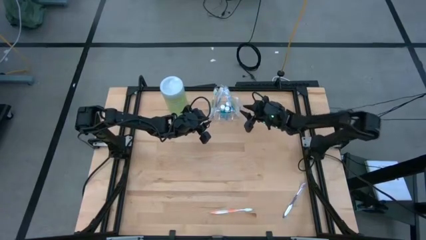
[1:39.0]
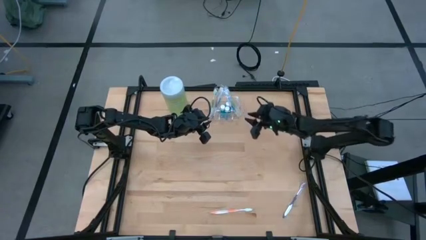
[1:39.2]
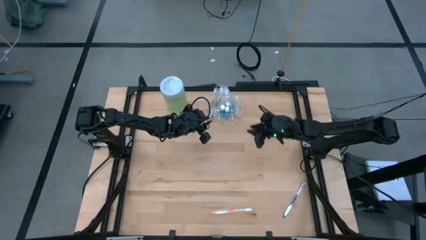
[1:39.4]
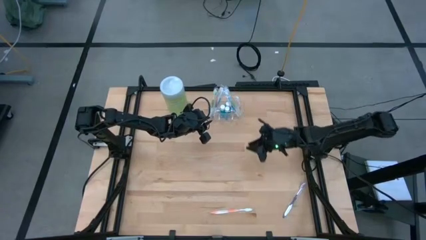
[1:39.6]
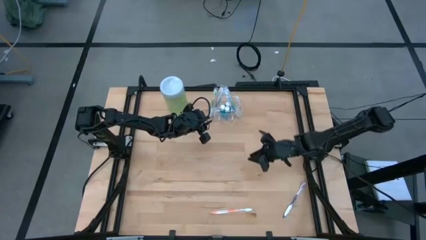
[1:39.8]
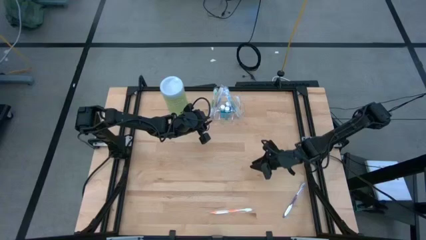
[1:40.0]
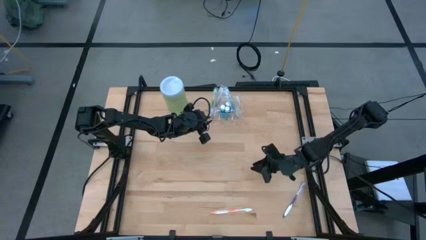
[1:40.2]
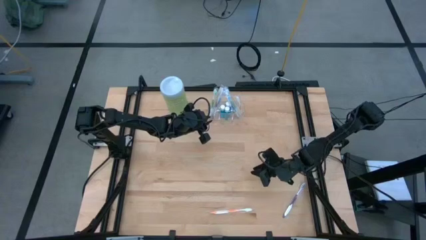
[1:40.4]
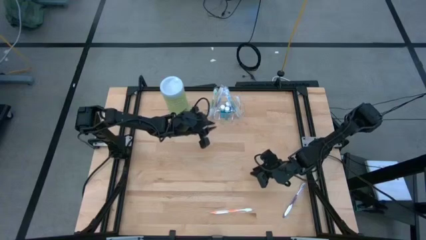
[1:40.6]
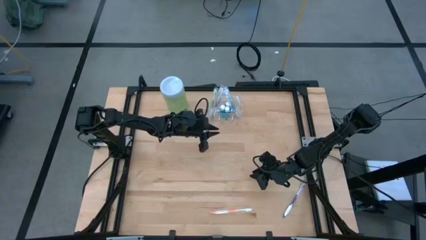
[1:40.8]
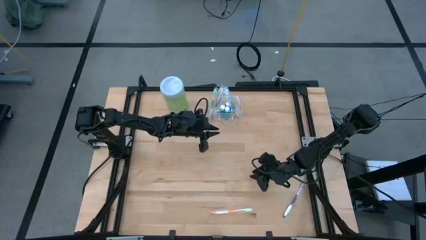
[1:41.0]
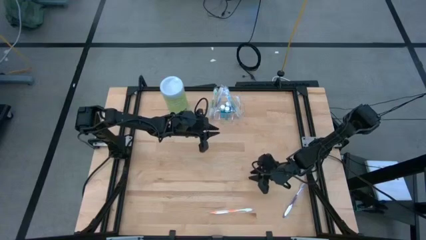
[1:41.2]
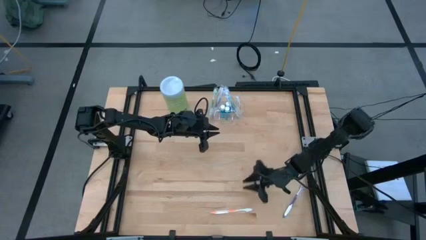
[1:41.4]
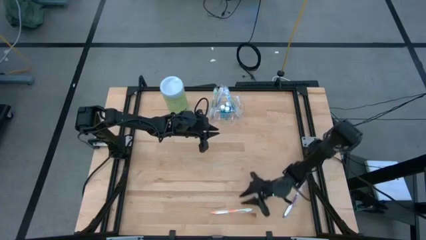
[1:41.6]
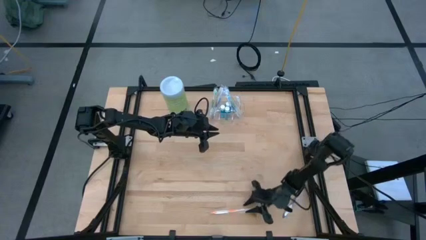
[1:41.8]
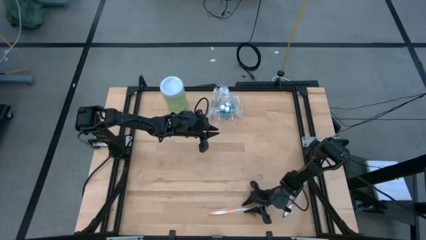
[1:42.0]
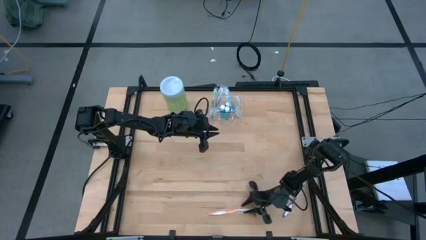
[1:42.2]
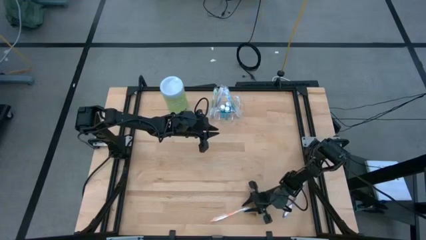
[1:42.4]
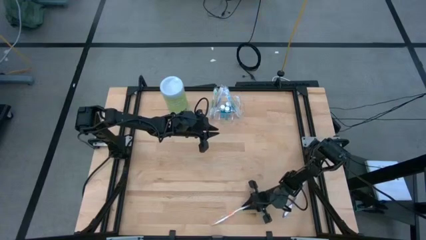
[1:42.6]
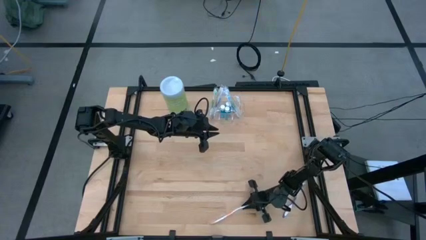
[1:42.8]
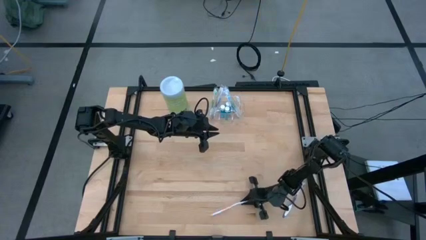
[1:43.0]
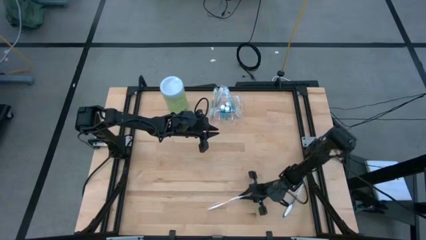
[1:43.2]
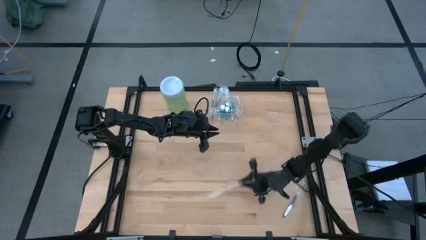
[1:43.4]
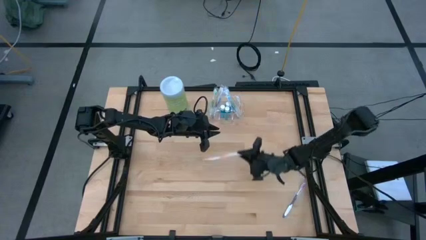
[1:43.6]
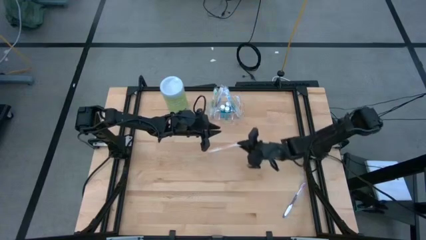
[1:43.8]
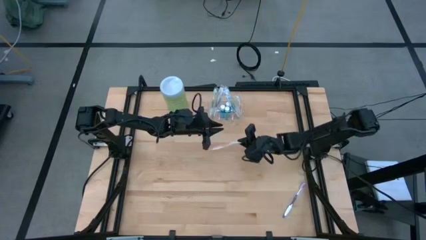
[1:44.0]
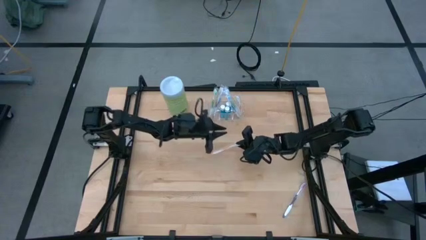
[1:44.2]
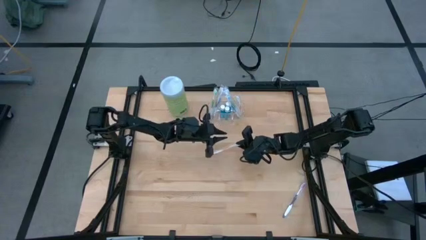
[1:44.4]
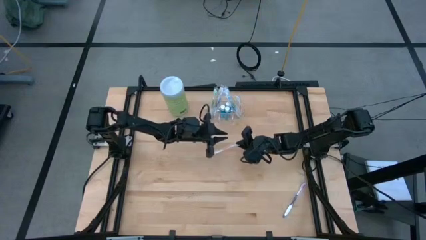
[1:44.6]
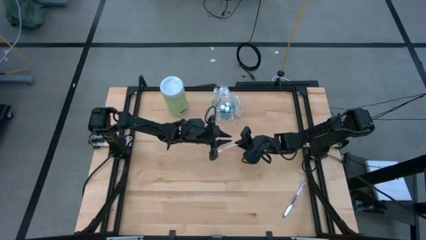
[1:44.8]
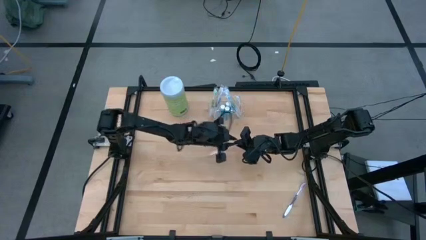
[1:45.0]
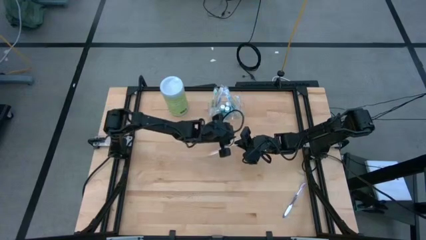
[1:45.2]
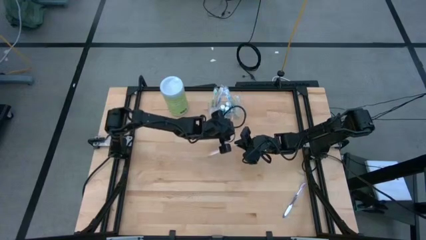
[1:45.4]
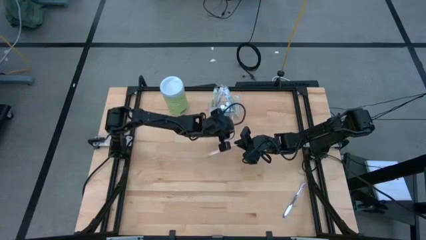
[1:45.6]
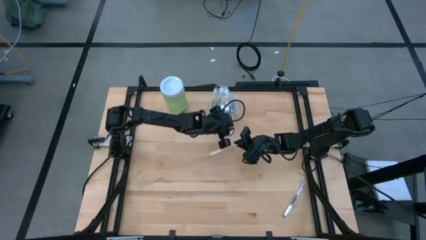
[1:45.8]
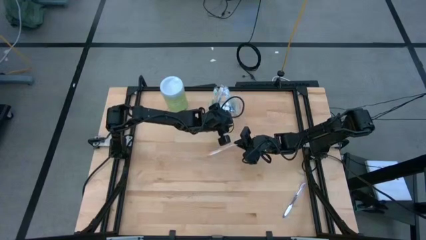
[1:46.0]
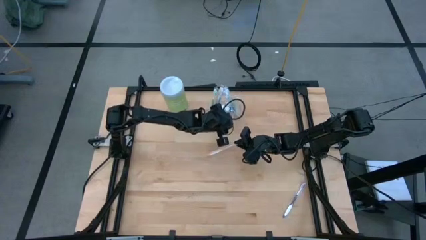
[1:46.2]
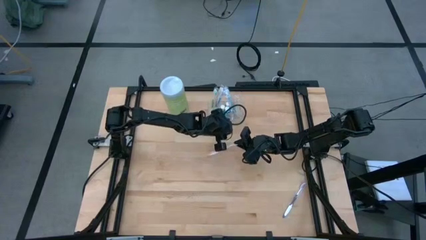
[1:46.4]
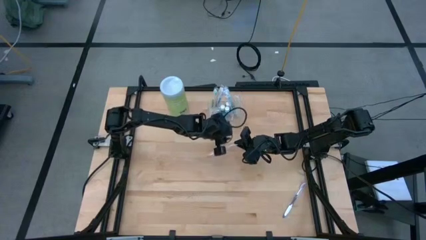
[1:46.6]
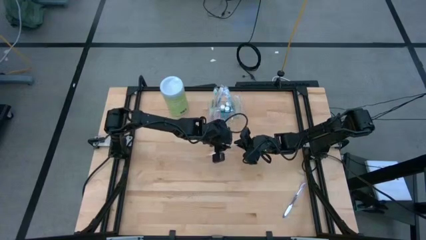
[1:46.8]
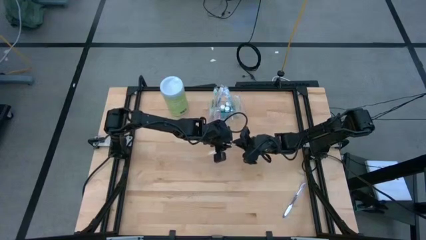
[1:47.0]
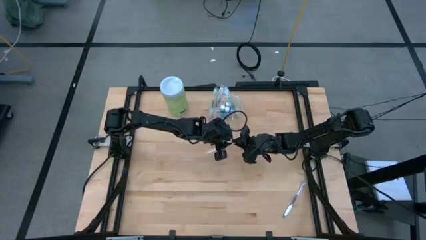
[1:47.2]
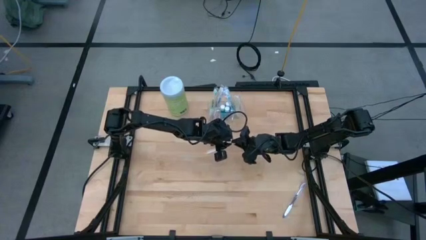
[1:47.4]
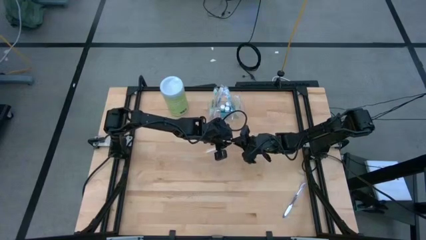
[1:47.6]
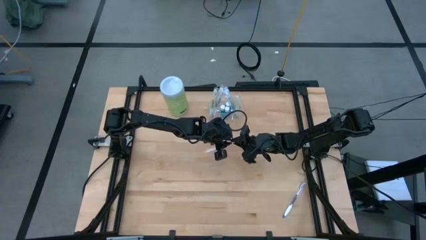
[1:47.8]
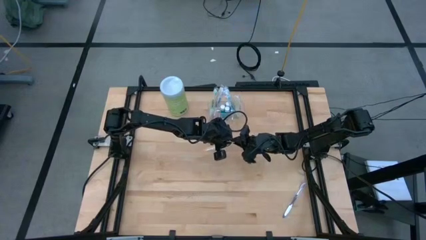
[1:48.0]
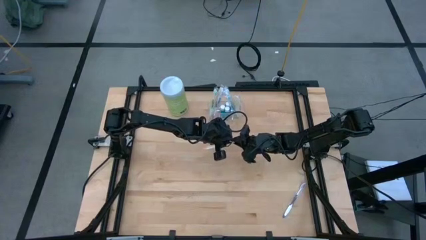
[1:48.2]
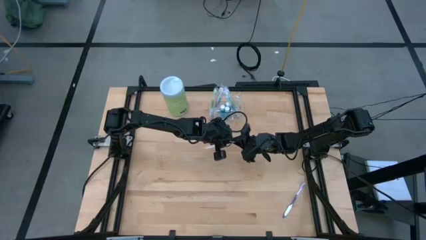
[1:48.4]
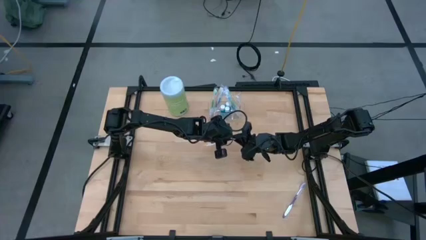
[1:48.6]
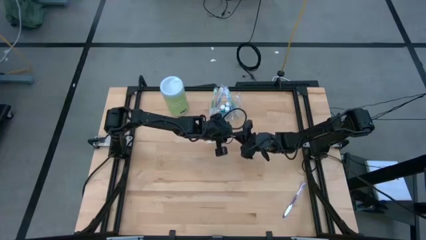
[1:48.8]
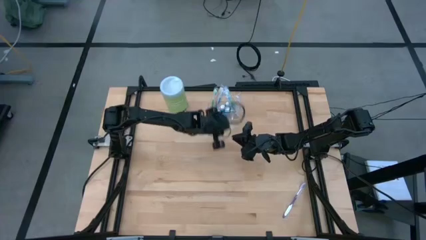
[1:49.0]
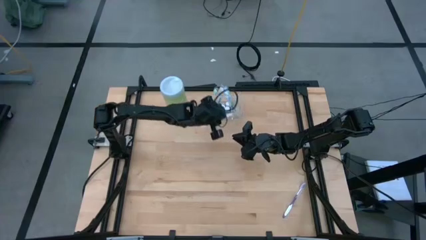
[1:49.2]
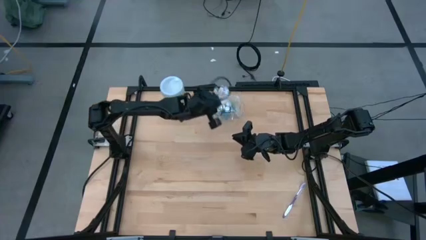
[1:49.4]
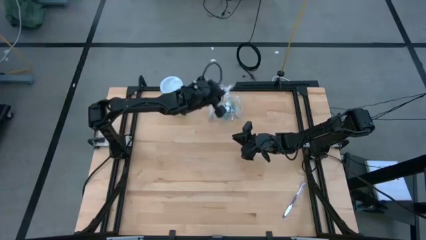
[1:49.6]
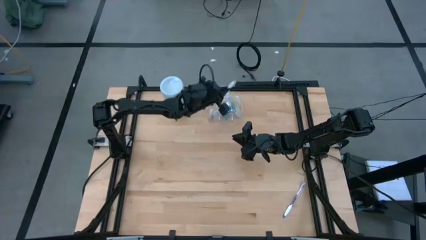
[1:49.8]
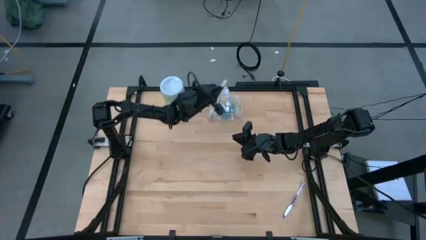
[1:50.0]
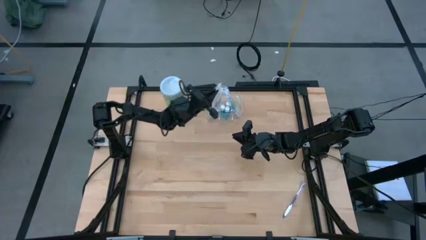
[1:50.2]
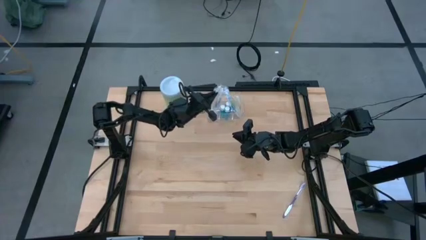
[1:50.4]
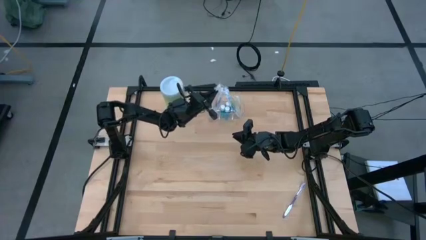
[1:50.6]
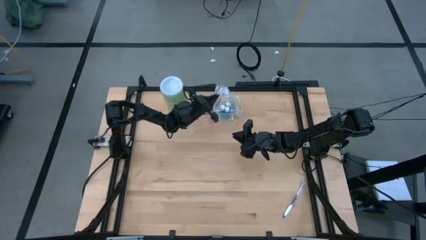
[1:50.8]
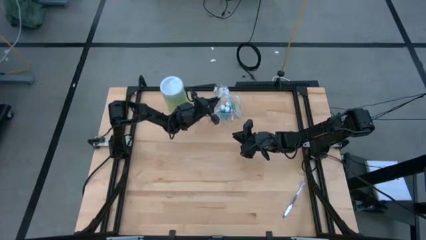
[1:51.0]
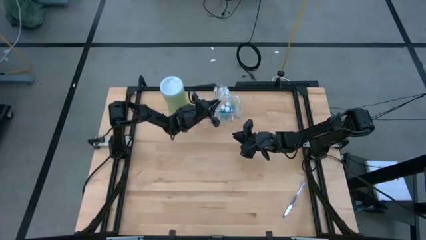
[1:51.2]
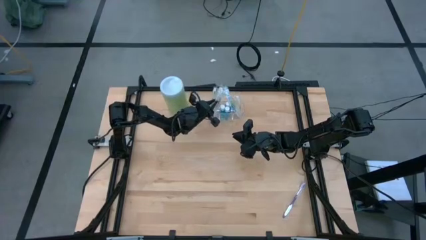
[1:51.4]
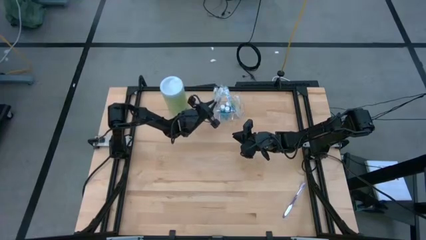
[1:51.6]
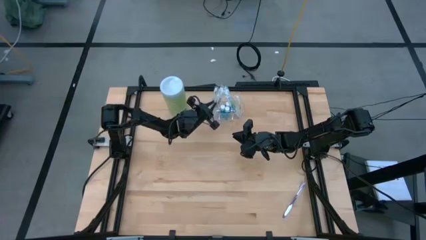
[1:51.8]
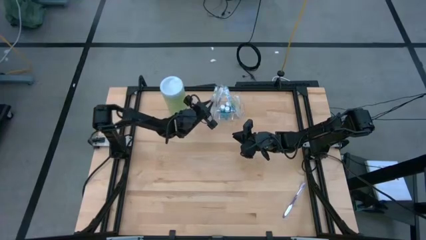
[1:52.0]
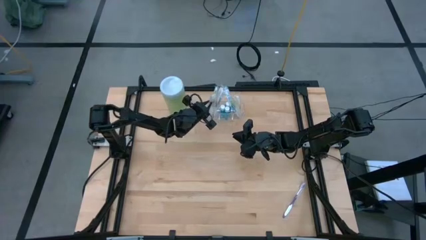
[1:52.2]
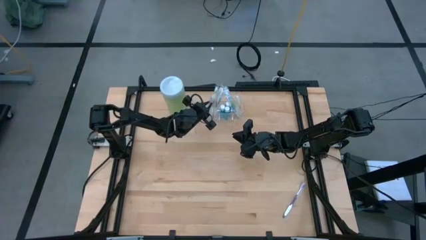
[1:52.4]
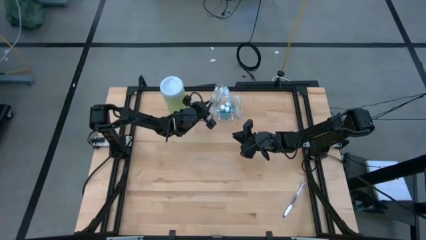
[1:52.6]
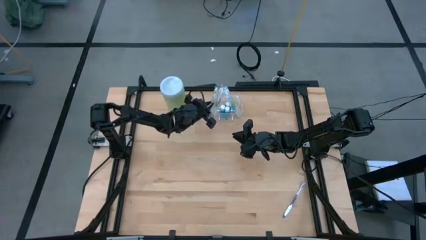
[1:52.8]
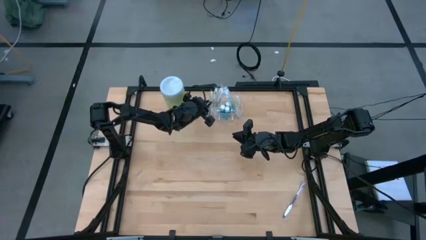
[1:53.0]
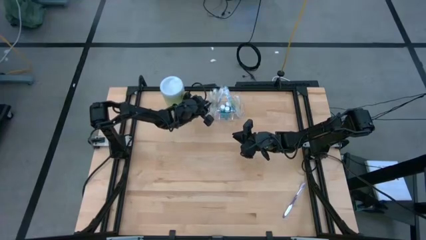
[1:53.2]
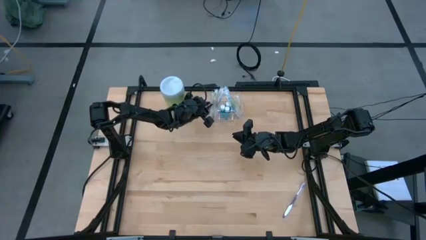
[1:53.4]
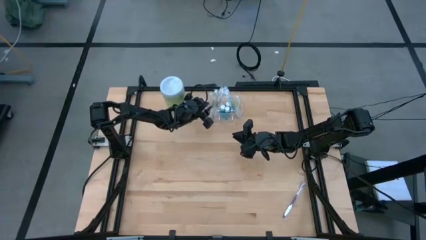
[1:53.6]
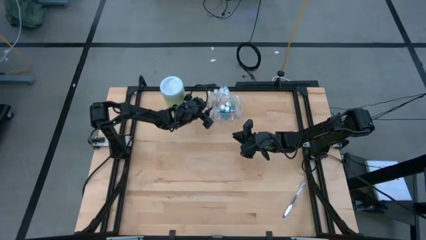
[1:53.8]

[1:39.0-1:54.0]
Task: Pick & Place toothbrushing station
Put the orange toothbrush into the transparent organizer

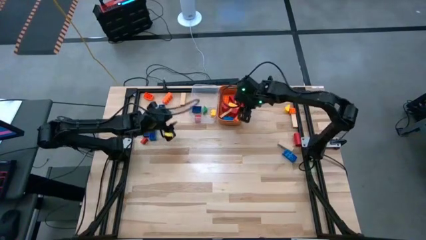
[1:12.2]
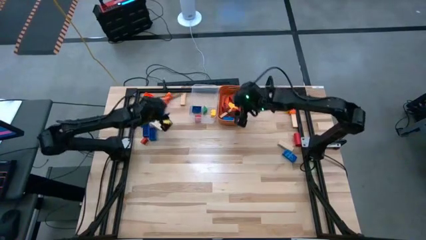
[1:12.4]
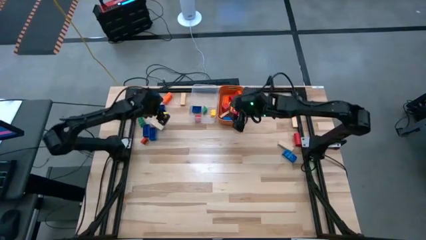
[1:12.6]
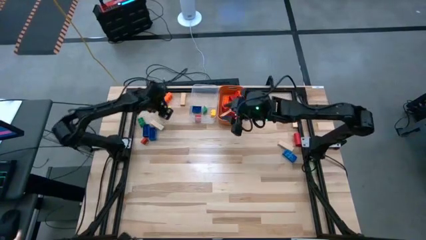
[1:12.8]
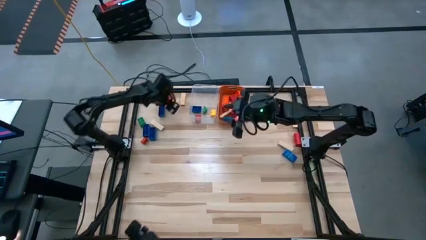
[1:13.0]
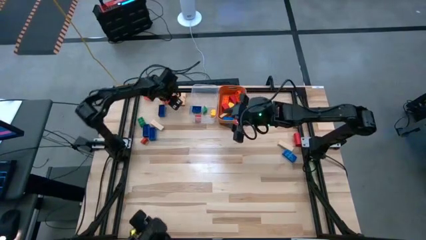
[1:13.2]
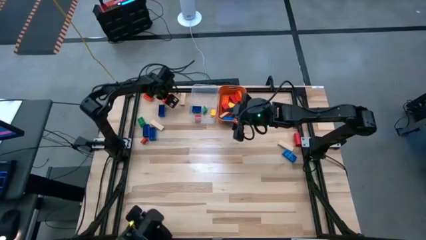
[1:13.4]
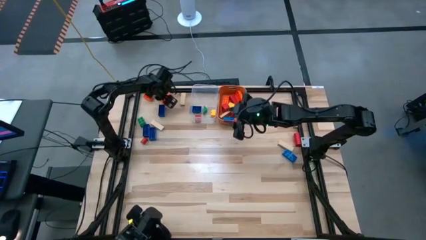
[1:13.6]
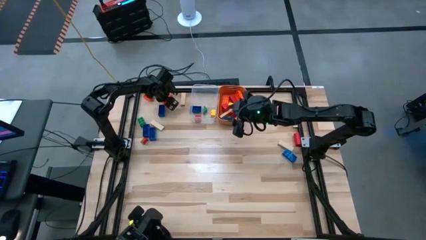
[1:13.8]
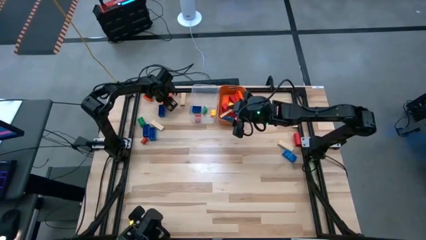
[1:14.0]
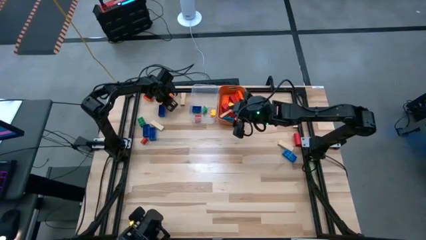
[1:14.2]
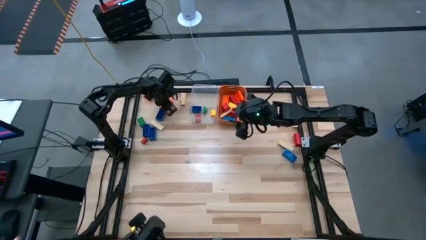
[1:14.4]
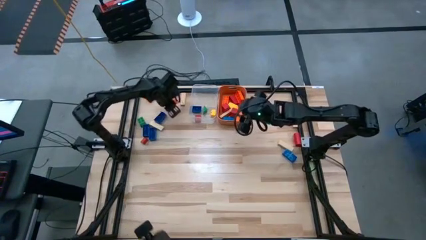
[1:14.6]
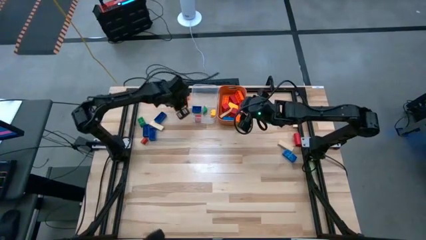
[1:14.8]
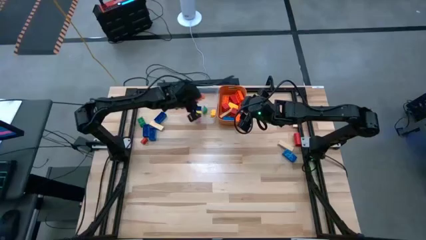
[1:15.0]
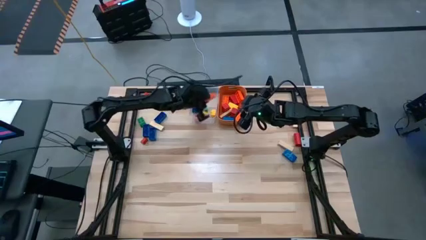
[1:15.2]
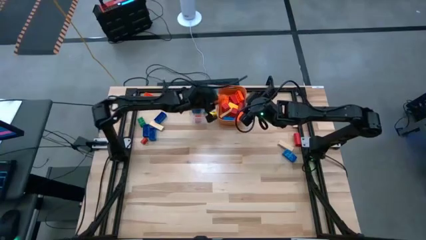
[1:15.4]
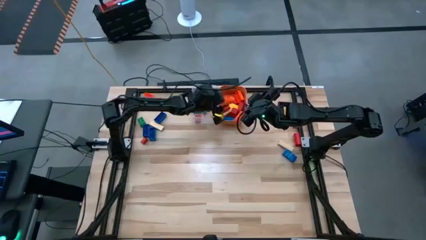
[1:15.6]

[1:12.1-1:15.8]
Task: Sort blocks by size
Put the orange rectangle game piece into the orange bin
